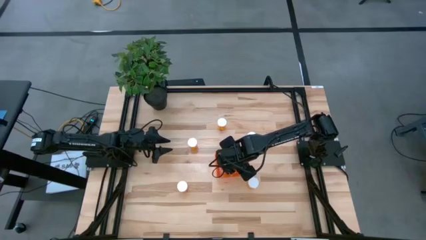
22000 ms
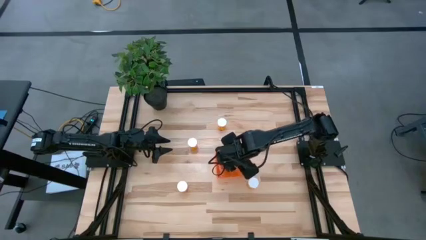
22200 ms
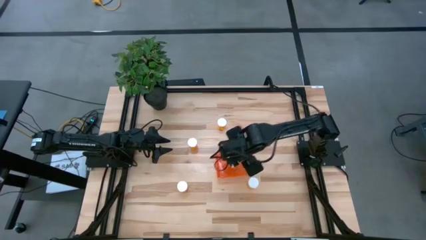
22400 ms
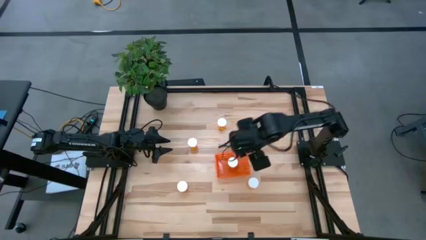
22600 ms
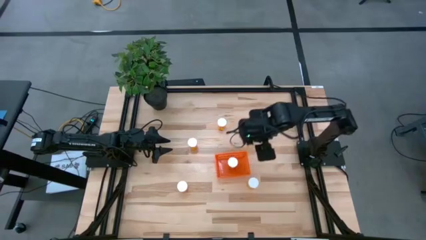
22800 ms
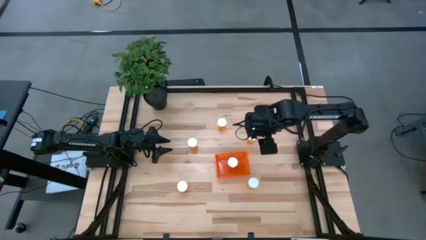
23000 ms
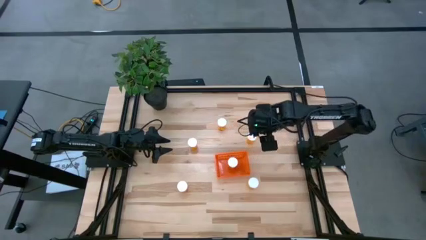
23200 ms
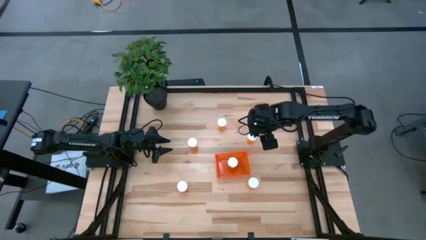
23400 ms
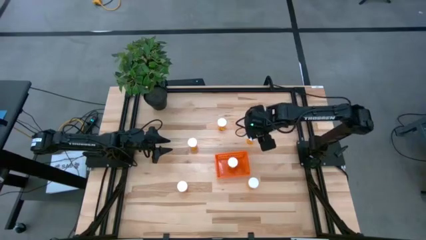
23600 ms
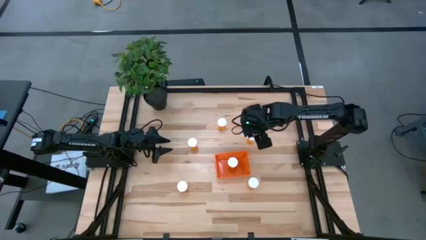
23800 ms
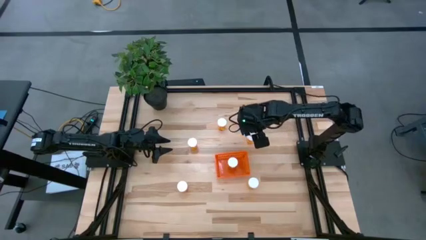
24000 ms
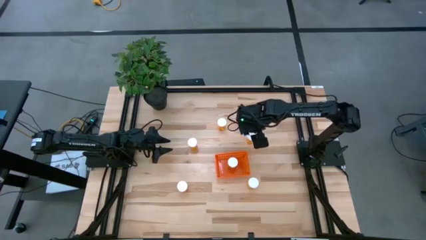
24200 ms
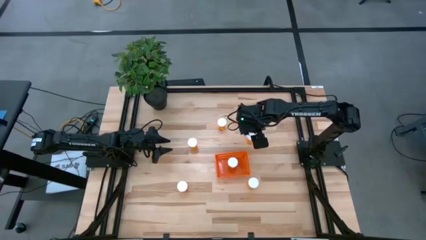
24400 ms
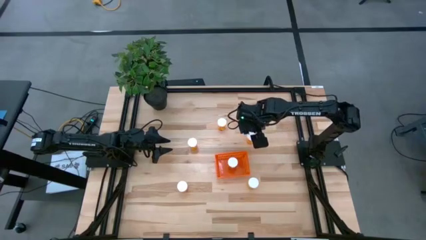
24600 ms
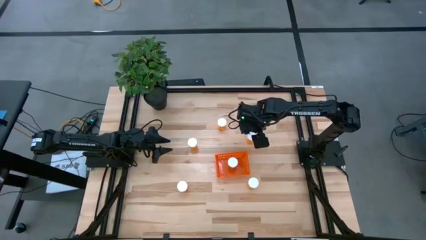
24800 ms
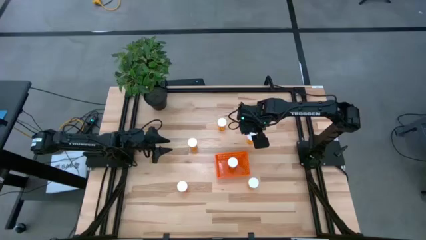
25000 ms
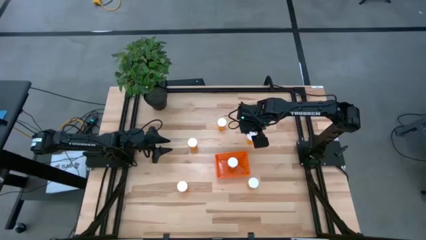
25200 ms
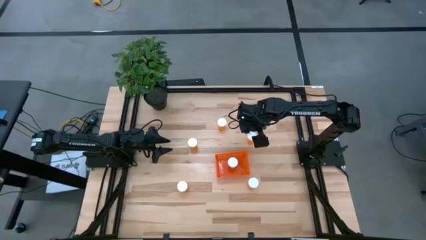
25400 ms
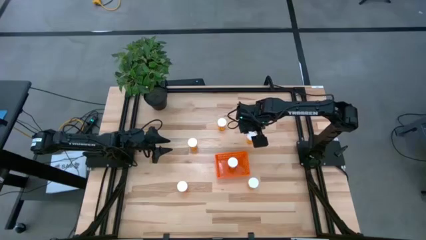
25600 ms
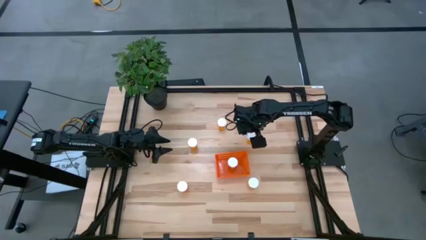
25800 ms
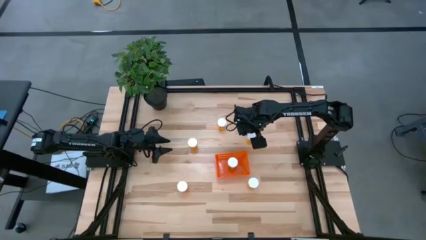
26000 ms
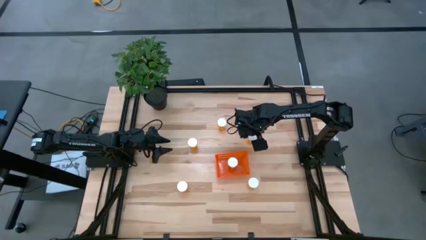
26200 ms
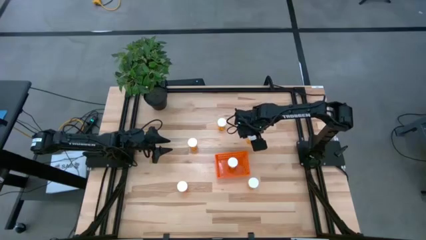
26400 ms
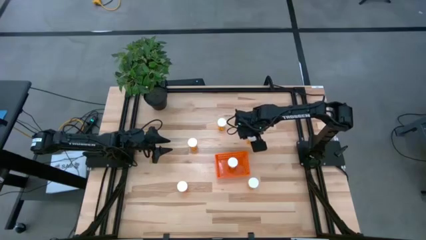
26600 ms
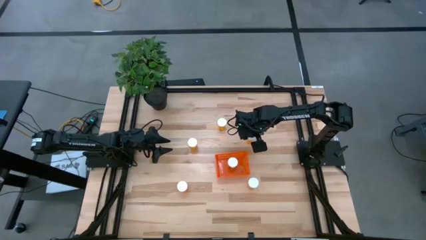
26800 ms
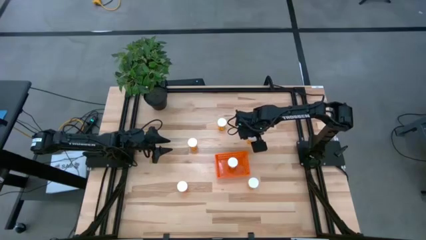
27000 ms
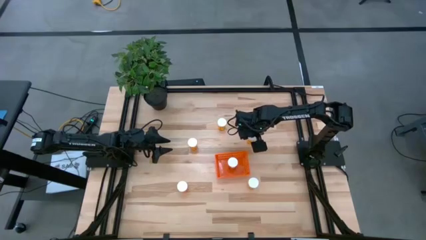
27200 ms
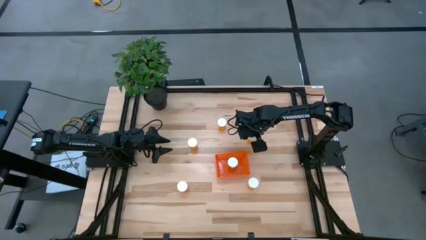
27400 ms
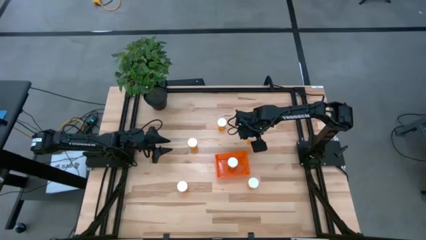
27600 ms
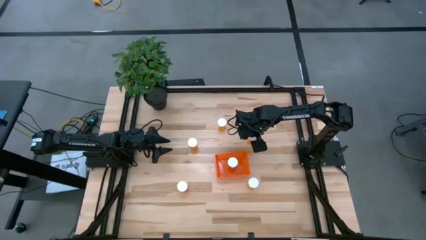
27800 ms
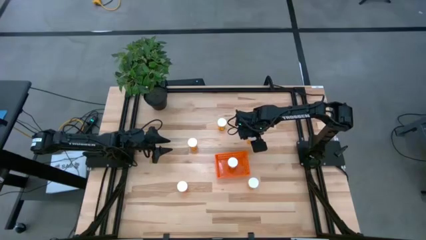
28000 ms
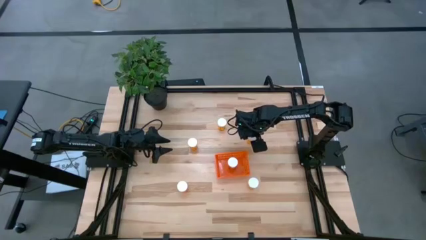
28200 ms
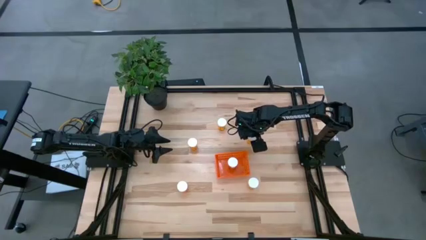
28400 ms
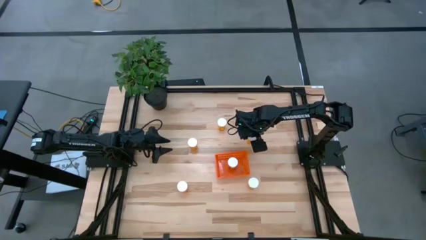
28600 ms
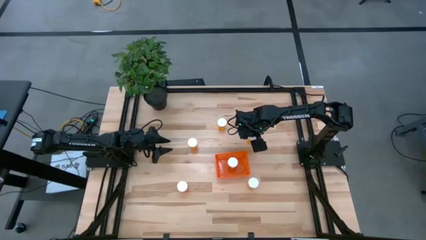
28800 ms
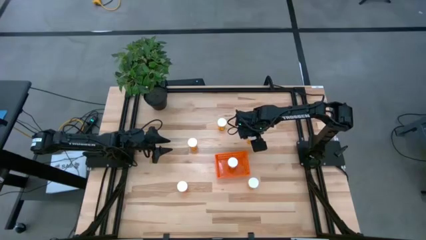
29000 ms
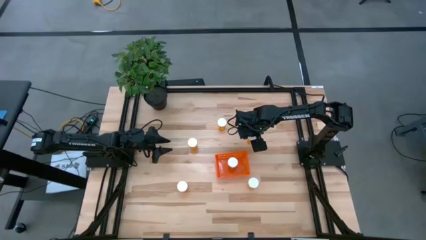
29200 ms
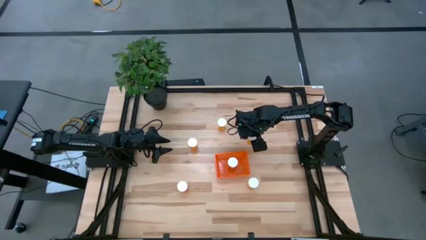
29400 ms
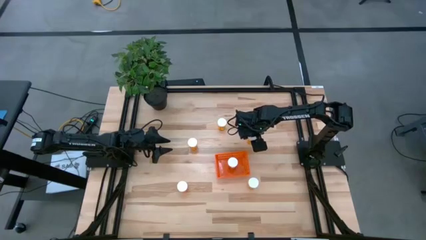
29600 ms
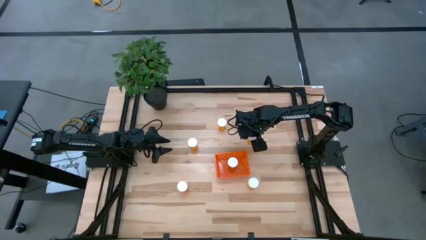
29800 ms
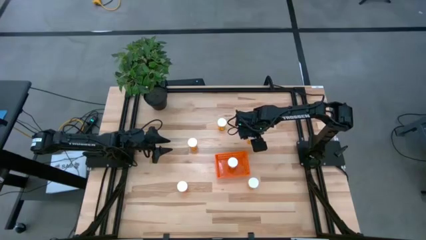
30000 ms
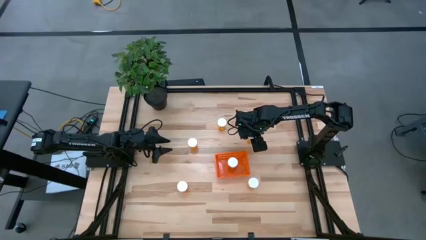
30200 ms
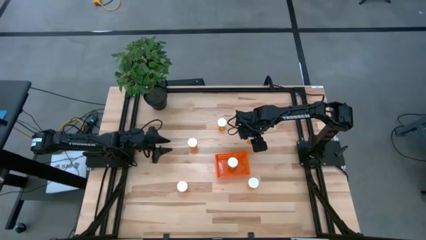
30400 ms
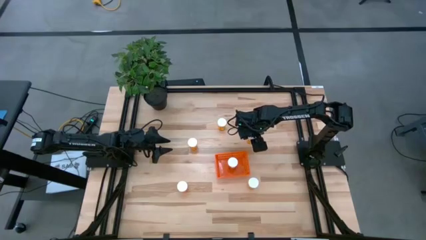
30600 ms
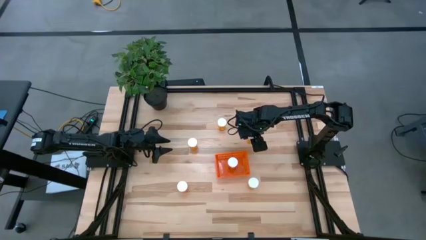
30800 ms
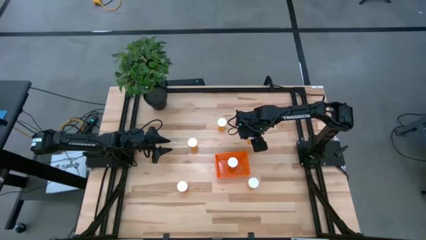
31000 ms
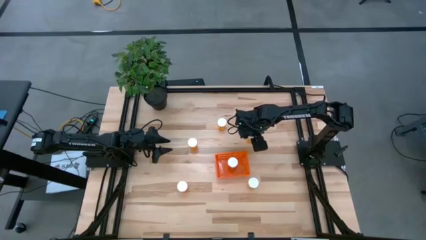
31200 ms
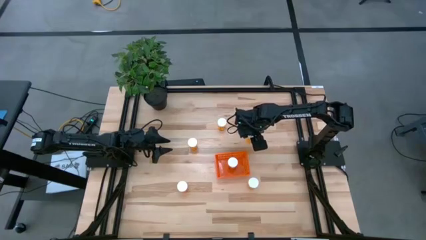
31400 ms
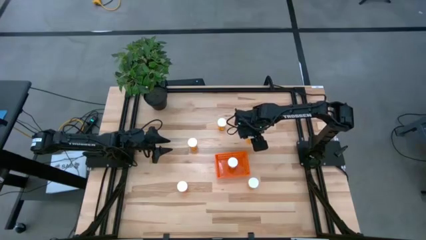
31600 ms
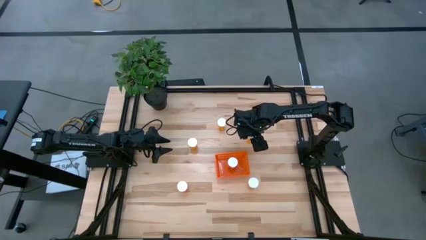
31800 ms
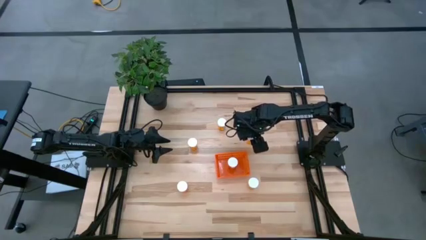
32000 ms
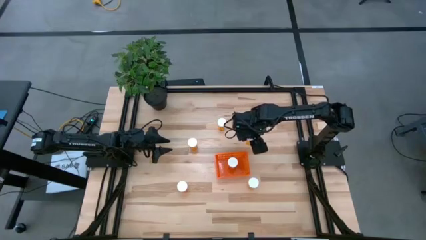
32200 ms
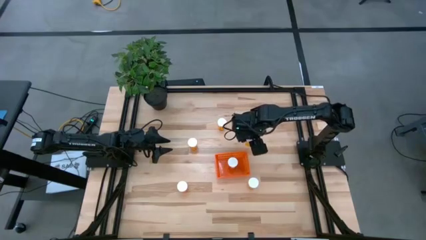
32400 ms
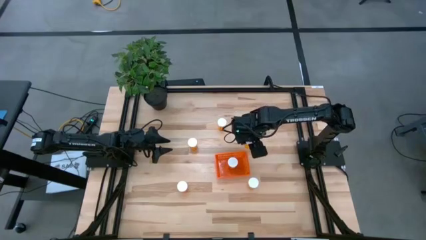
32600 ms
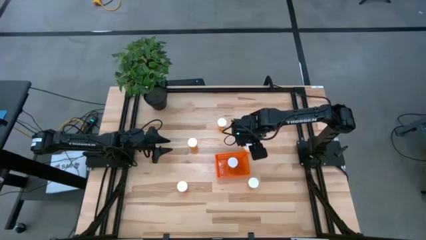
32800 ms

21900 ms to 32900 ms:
Task: Pick and place pill bottles into a basket
Put the orange pill bottle into the orange bin

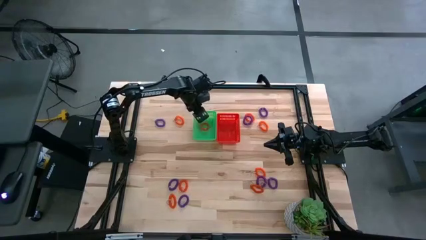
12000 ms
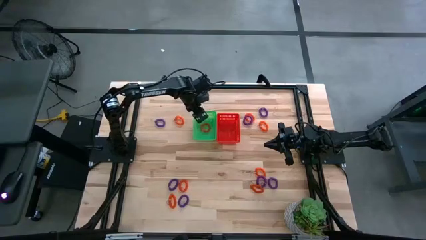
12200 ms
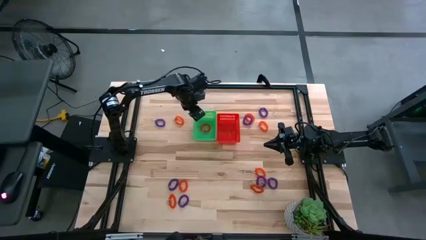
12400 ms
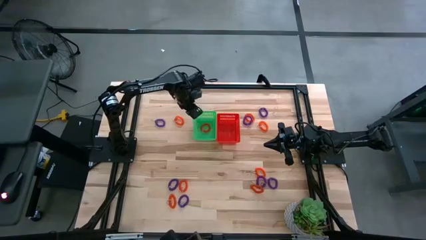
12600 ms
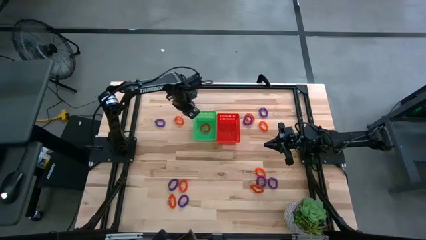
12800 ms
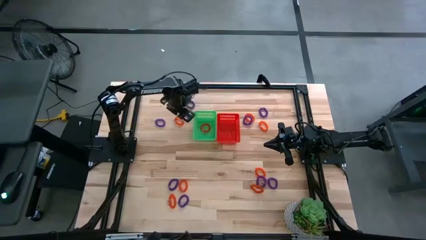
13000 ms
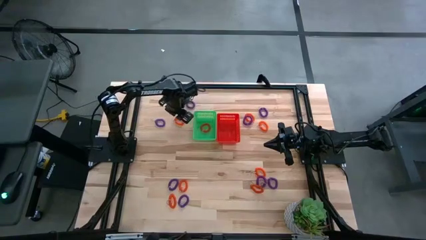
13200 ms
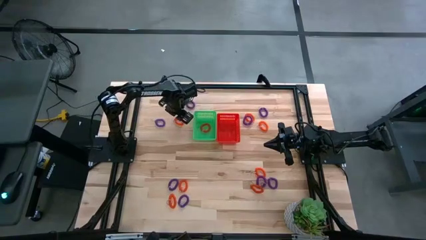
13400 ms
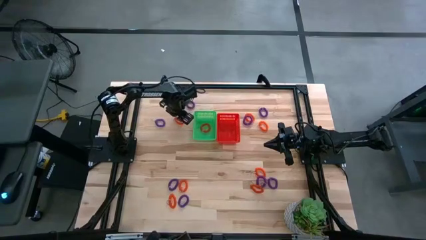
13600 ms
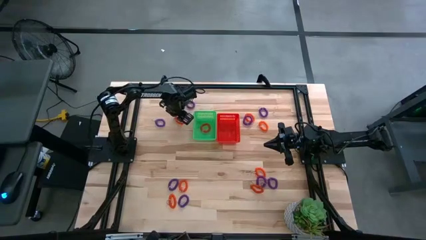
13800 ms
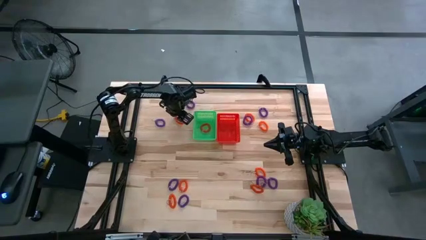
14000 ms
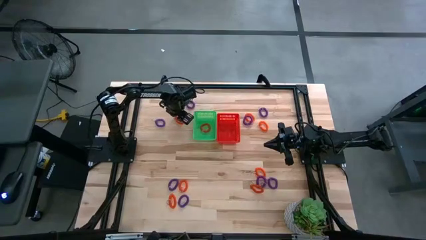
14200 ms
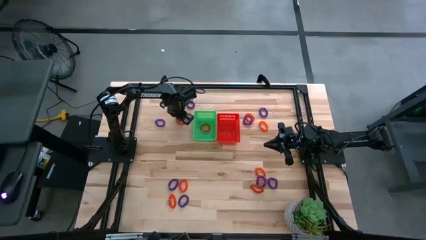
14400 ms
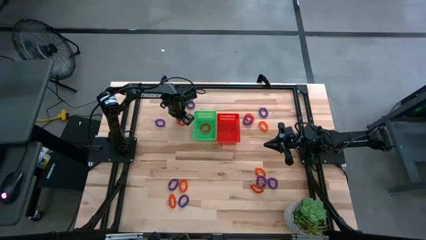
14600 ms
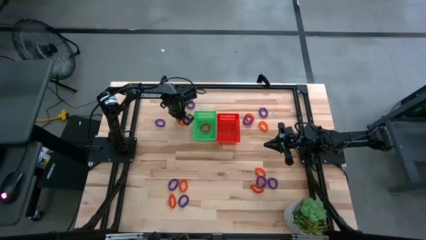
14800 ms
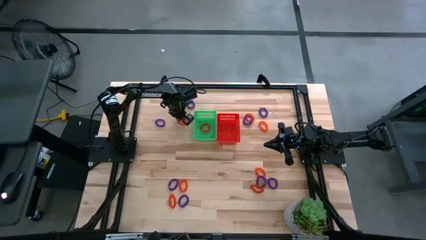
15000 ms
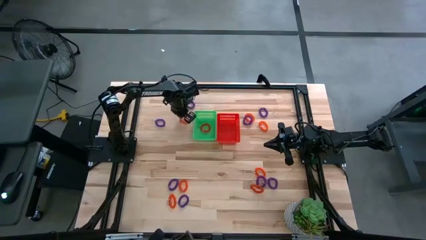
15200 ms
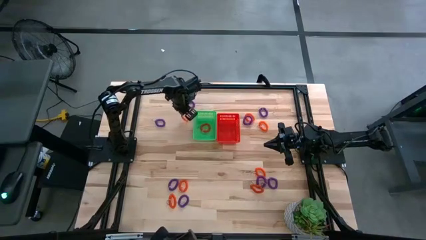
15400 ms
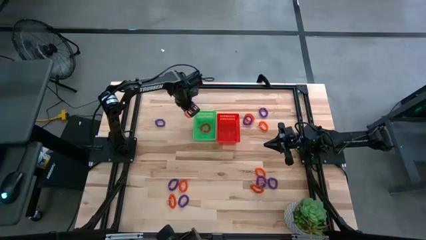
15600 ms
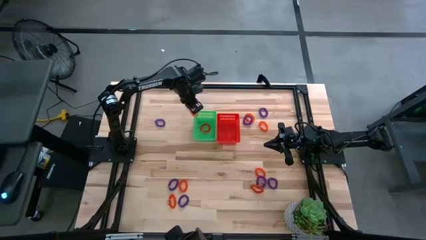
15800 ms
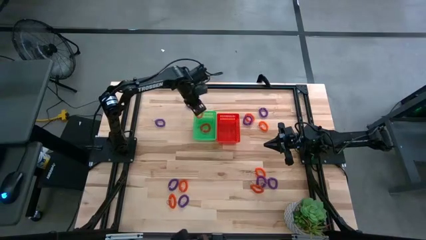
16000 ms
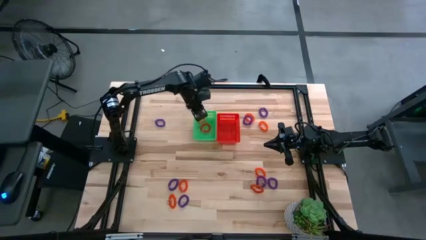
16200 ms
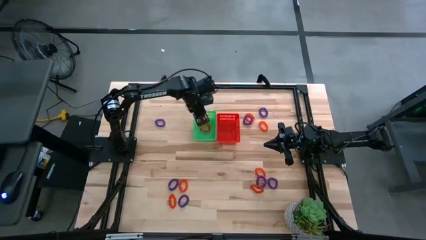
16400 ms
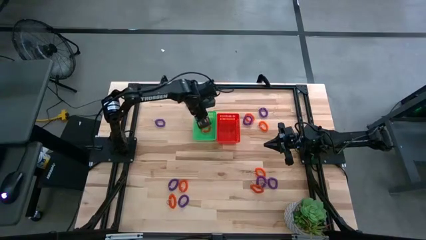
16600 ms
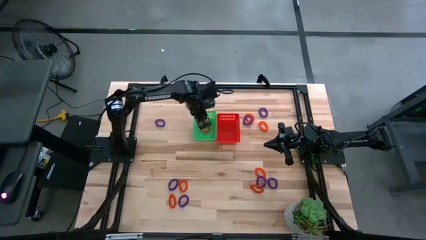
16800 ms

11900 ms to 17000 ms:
Task: Sort spring keychains
Put the orange spring keychain into the green bin
